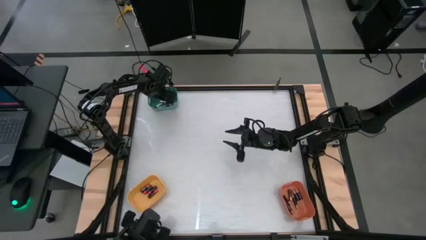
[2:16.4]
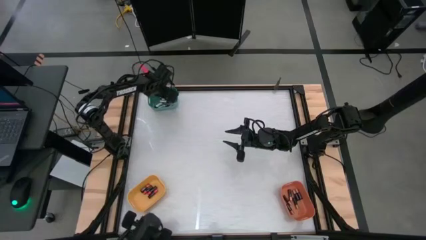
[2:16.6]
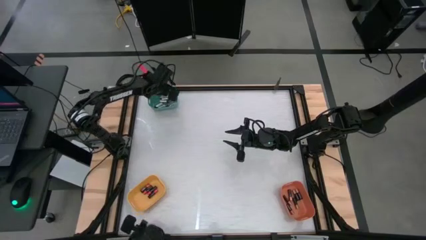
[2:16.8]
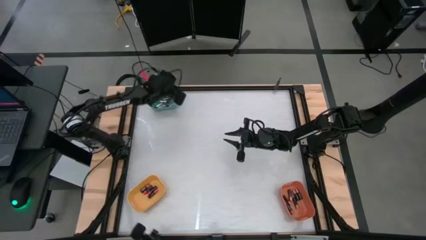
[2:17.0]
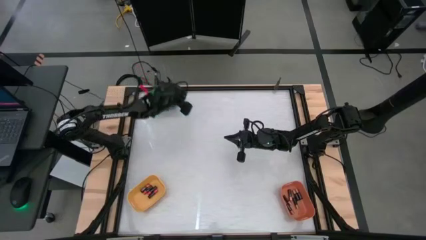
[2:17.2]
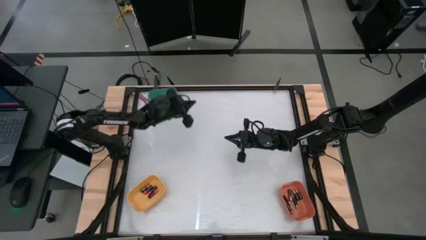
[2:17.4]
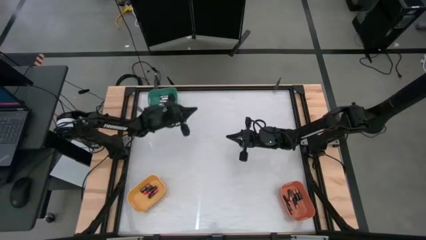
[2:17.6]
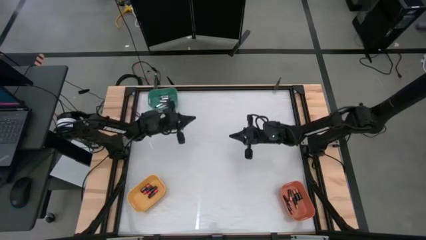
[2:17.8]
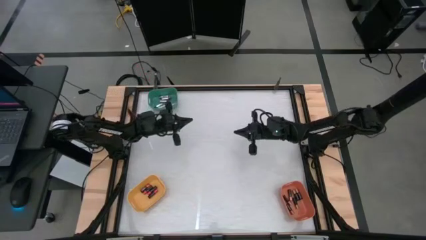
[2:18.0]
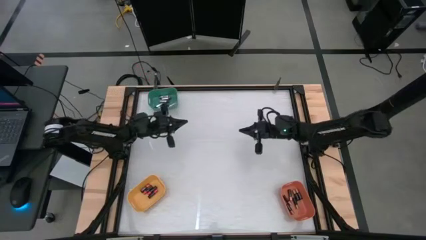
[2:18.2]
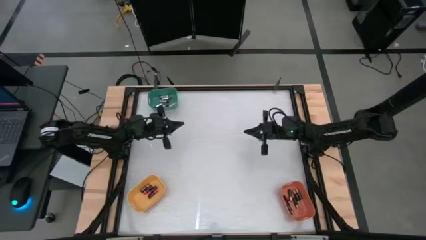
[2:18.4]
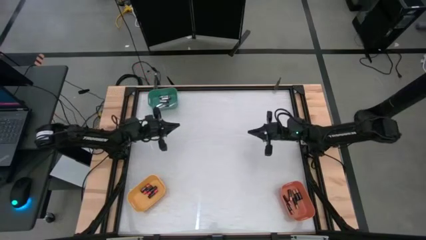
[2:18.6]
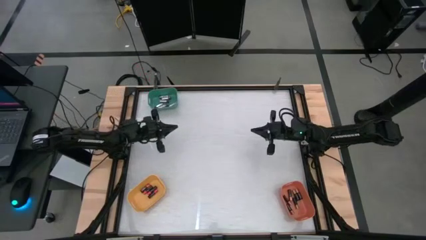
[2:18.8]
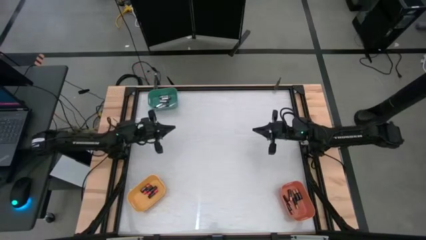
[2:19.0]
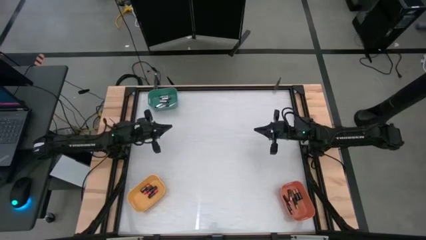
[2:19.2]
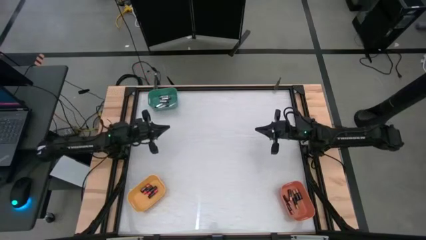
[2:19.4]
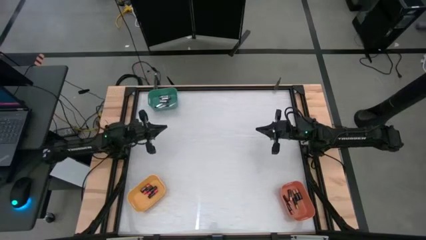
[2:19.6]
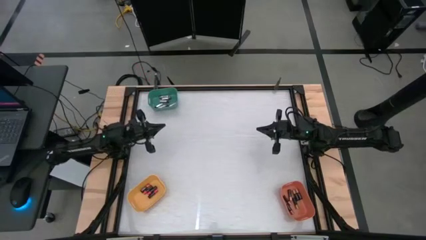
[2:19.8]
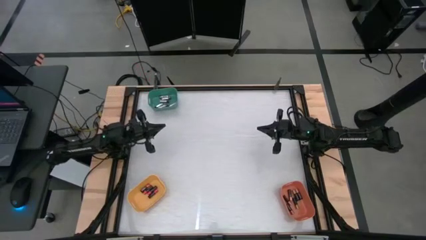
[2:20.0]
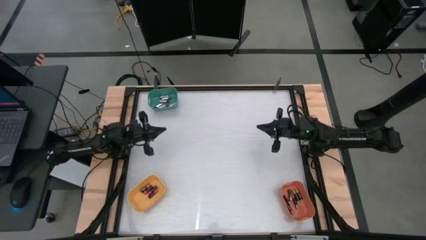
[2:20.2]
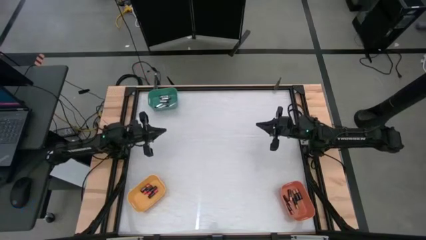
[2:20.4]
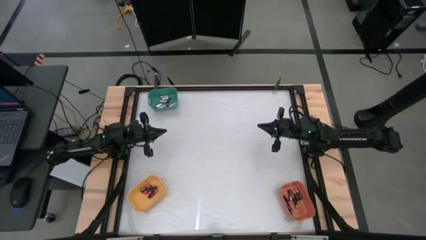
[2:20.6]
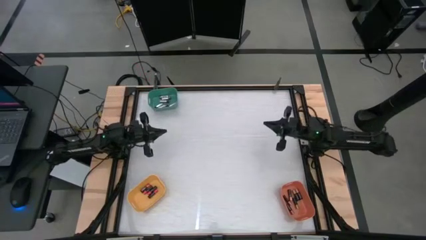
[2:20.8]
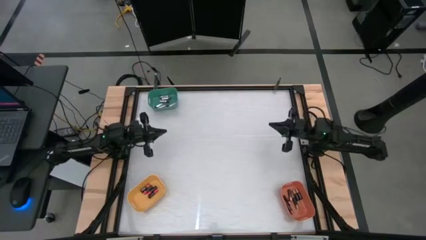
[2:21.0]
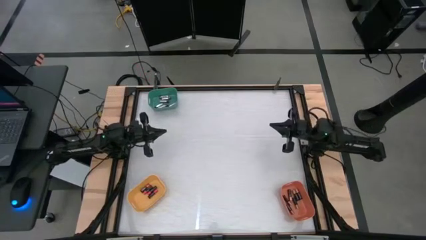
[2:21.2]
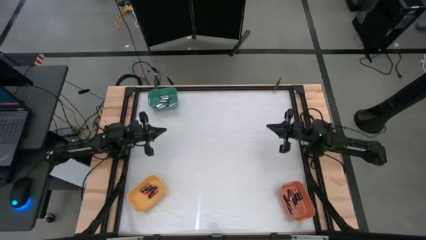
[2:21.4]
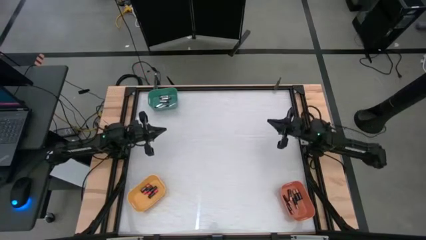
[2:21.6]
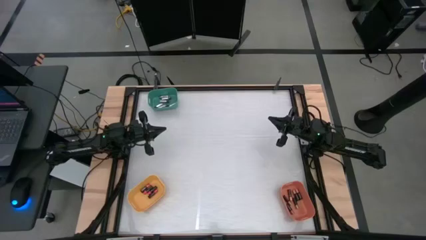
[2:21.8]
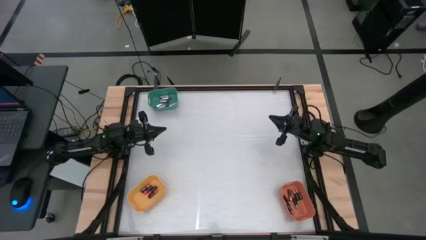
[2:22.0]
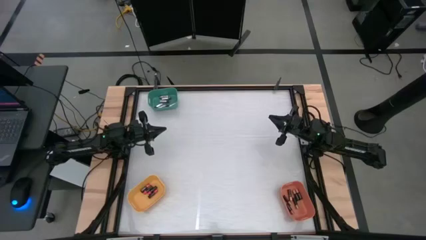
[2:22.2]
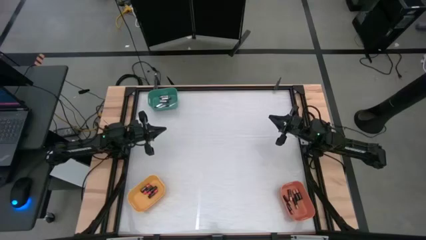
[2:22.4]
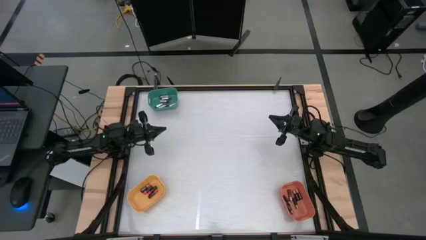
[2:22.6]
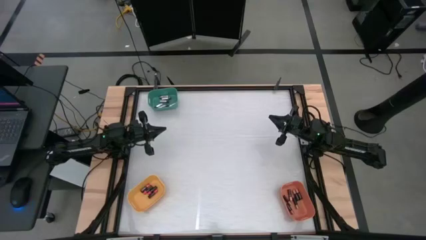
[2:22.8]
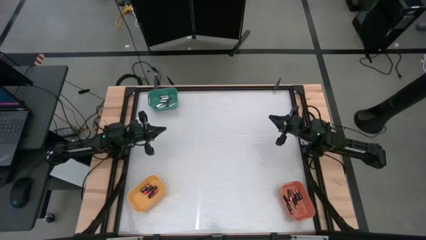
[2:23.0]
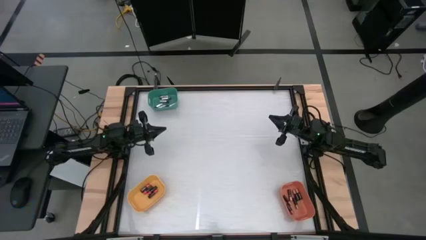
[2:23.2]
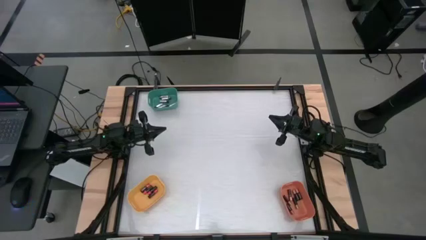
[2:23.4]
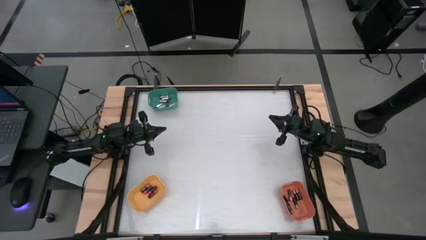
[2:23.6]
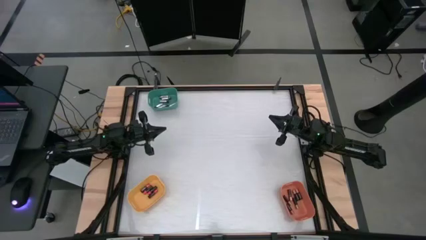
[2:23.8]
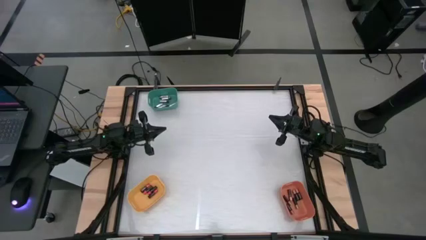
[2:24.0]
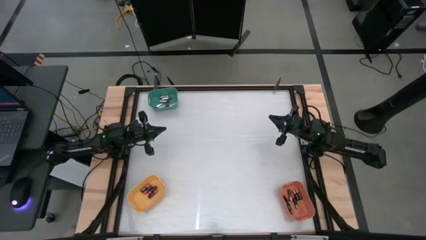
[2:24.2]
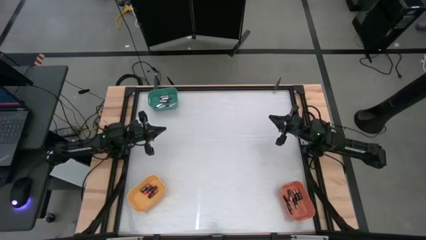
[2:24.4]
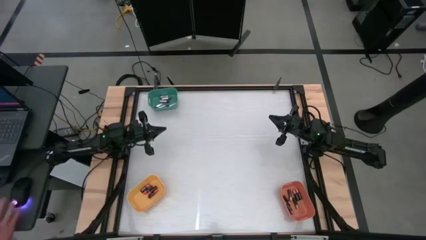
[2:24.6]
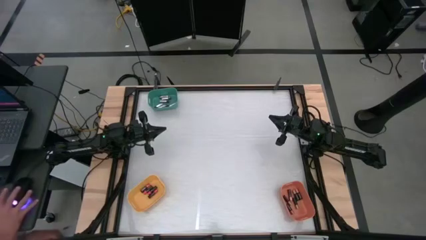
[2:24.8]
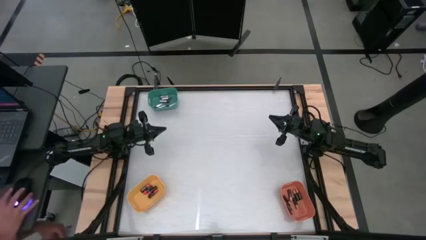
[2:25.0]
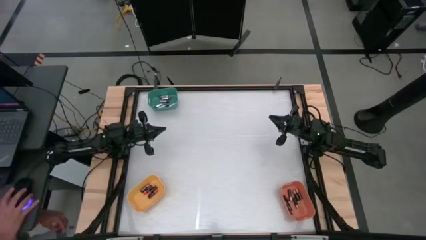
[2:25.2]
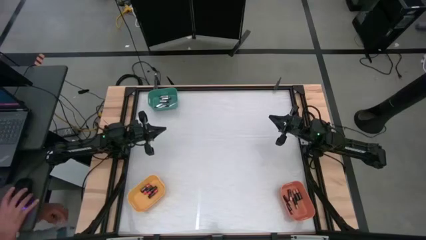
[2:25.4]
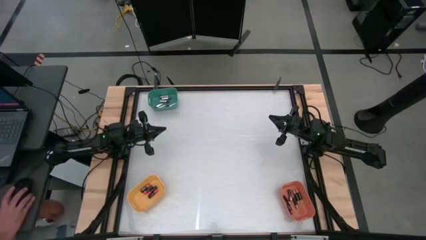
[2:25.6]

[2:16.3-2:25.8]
Task: Sort batteries
Return to home position
